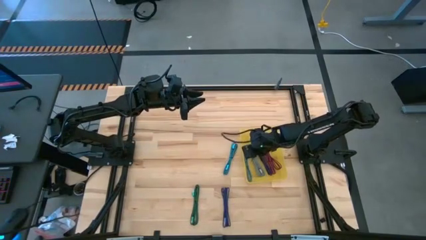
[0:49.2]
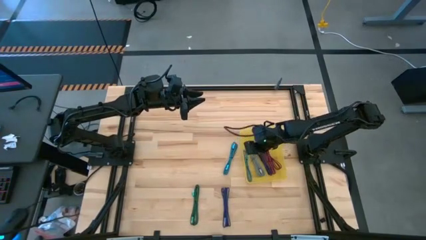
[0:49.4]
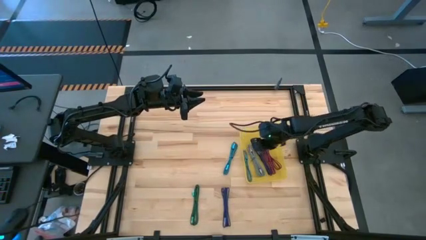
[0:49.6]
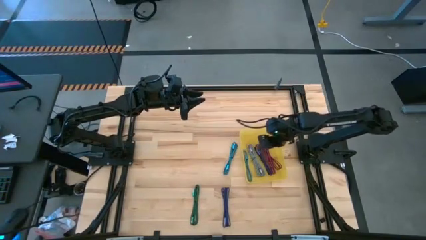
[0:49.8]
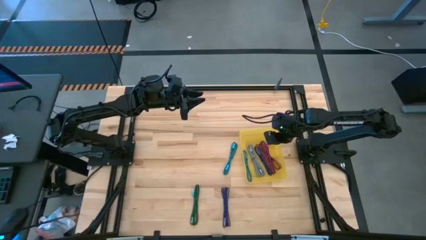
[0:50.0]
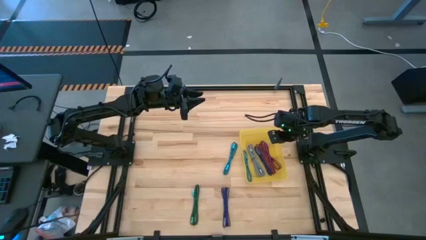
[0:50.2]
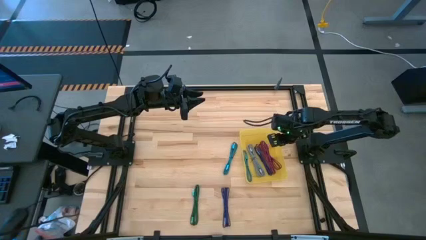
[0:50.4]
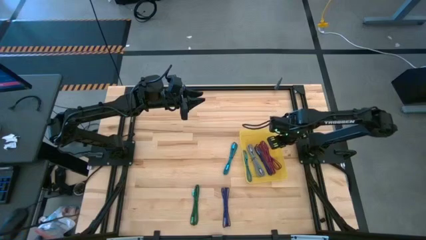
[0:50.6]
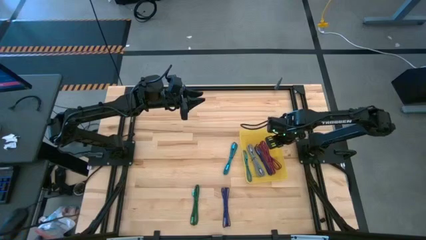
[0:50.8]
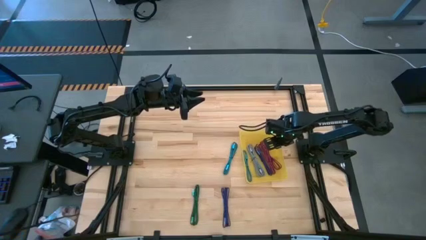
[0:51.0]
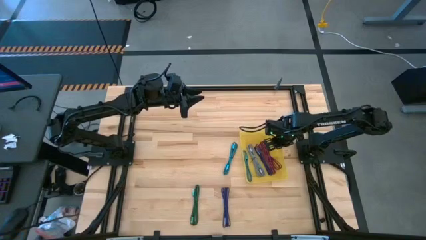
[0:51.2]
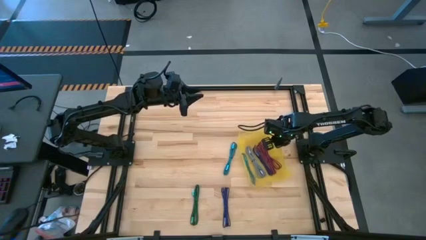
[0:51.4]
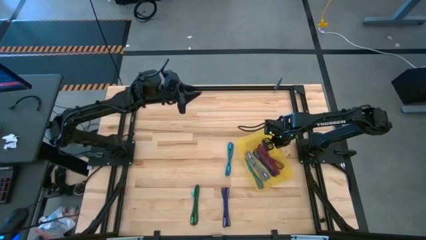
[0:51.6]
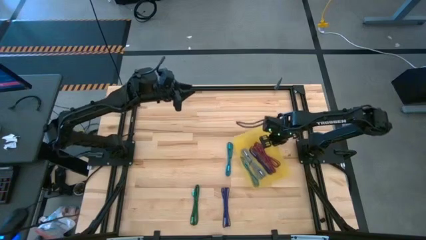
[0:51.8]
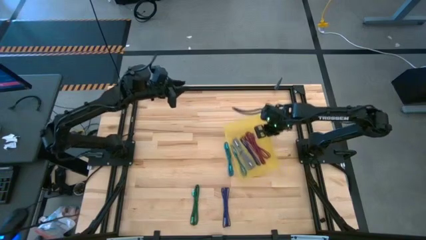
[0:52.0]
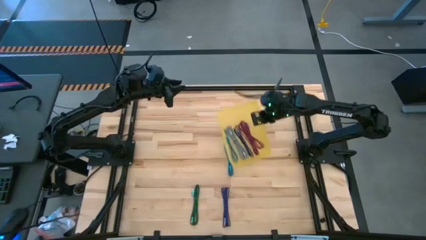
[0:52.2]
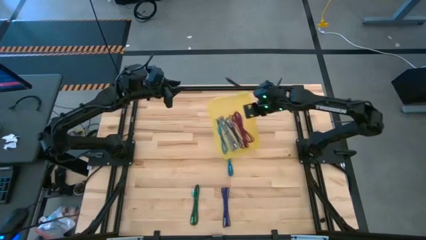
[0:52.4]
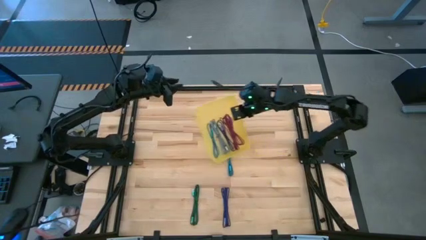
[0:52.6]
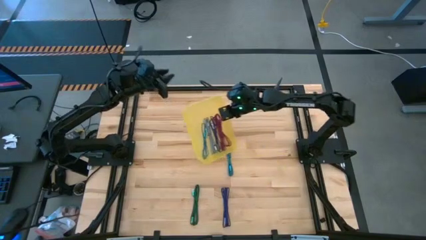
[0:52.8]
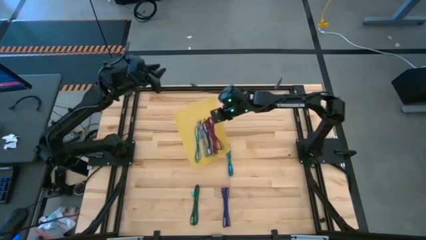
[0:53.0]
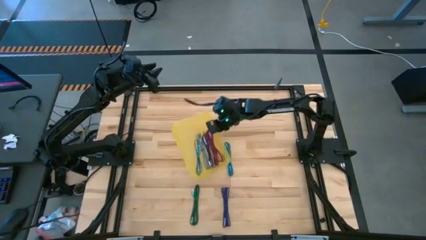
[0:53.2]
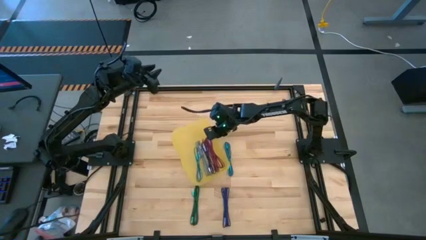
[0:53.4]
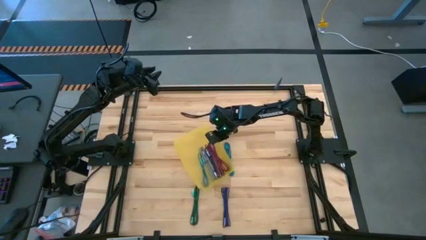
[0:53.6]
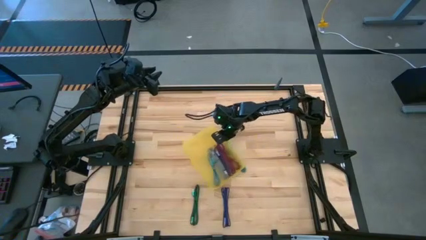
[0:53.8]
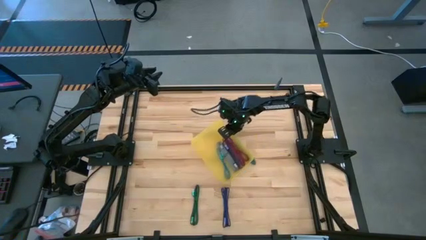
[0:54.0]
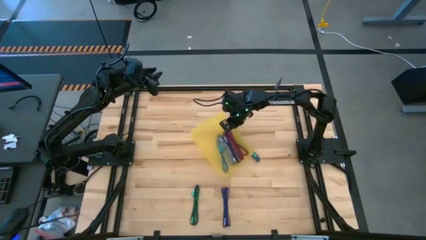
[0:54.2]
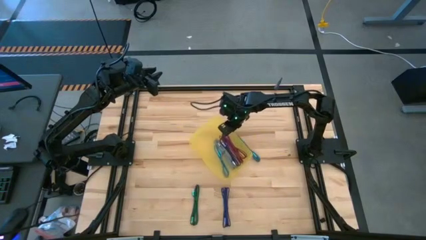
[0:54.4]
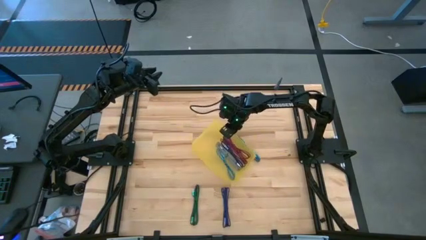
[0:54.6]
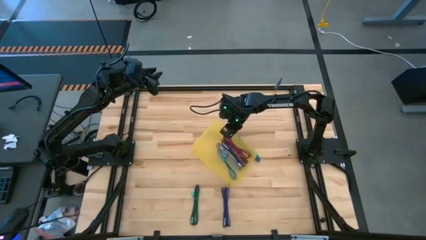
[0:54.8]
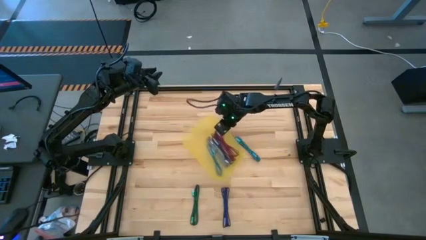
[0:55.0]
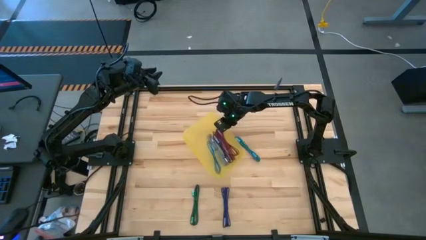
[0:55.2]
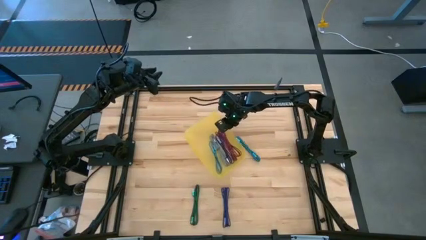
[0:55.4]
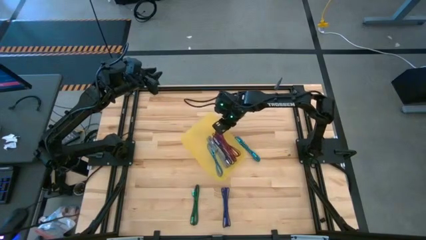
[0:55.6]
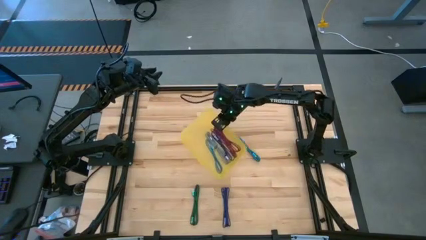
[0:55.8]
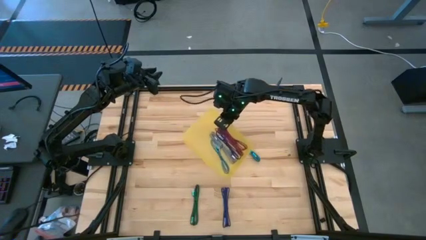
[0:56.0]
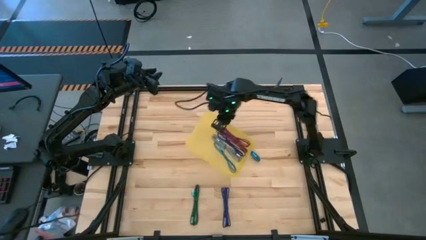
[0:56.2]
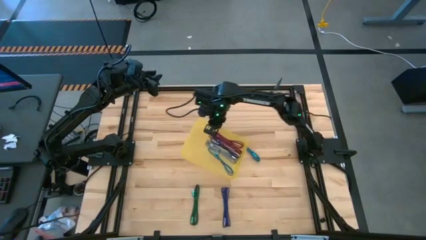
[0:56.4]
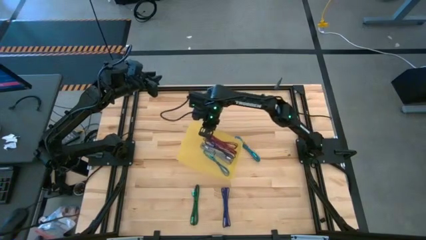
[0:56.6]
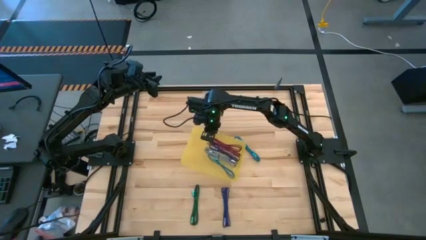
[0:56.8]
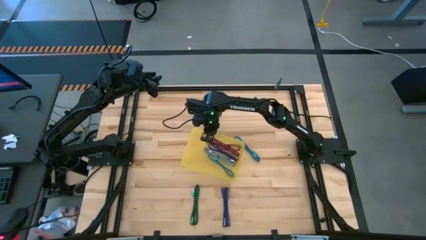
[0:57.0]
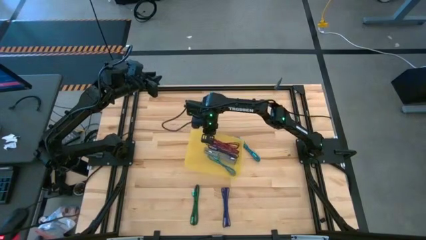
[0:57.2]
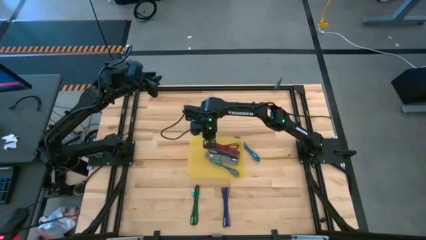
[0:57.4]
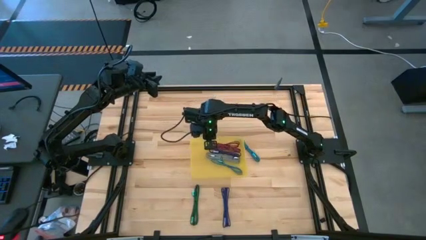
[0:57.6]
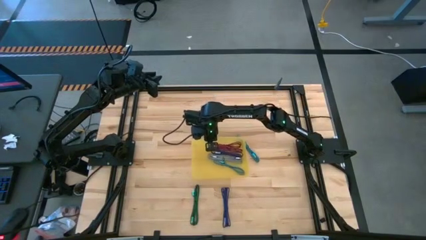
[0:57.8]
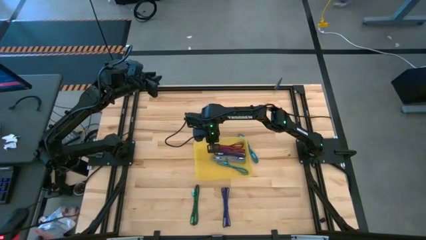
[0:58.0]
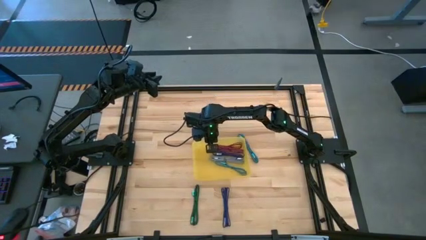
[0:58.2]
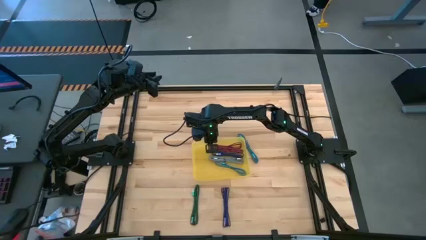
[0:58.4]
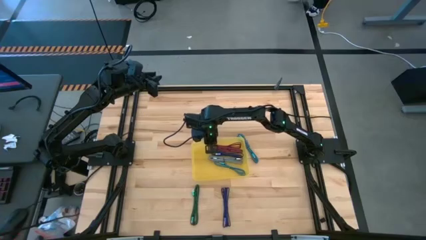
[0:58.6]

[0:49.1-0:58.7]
Task: Pick and place USB-C Cables
Move the yellow bin to the center of the table

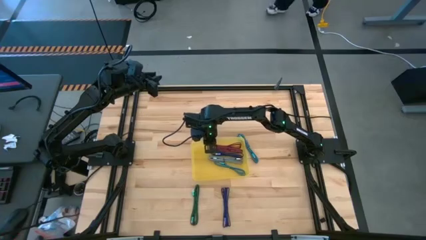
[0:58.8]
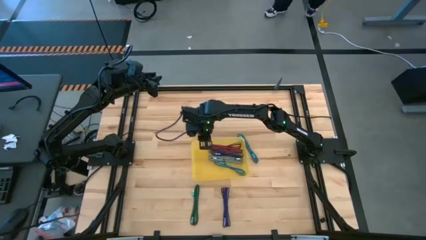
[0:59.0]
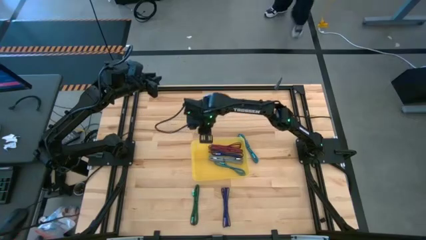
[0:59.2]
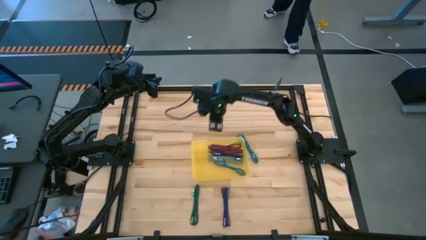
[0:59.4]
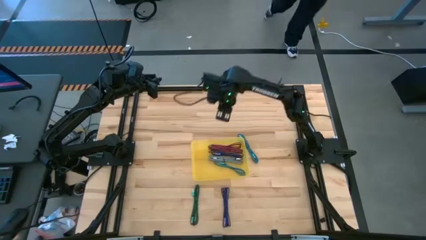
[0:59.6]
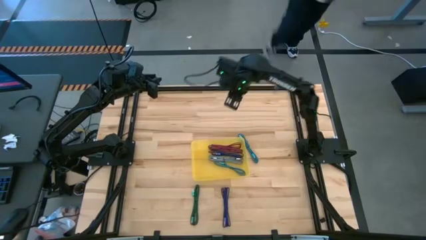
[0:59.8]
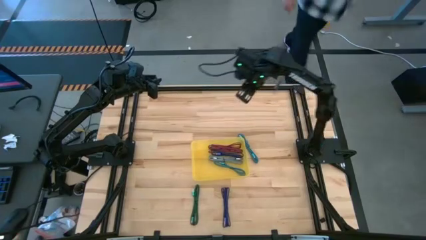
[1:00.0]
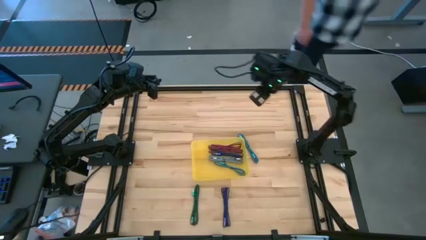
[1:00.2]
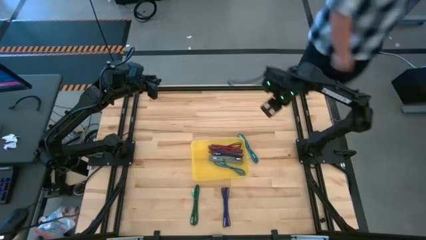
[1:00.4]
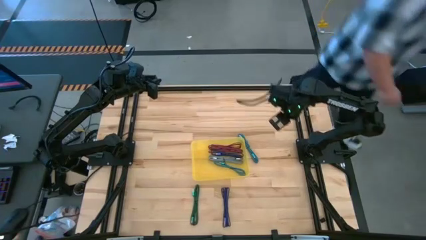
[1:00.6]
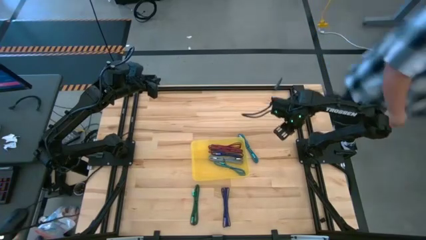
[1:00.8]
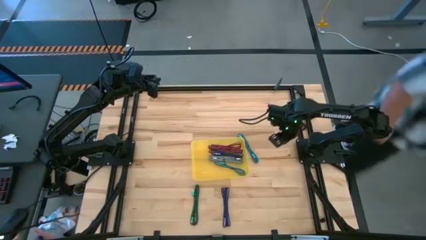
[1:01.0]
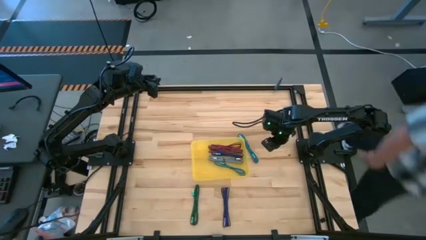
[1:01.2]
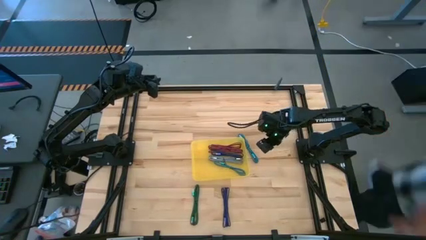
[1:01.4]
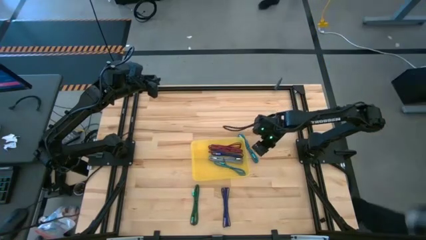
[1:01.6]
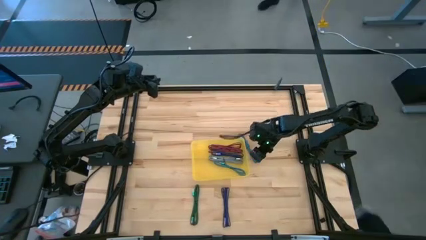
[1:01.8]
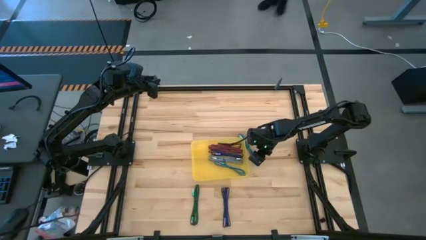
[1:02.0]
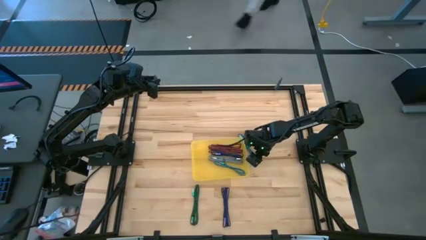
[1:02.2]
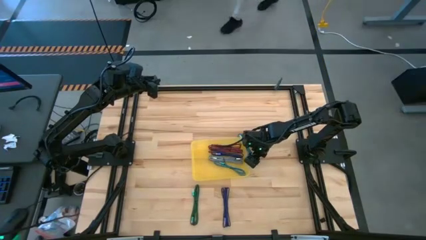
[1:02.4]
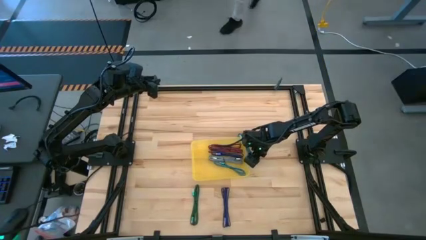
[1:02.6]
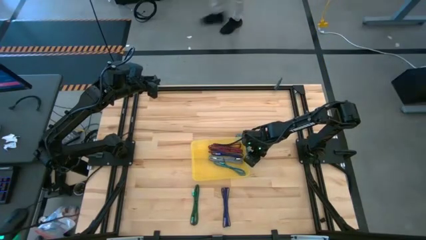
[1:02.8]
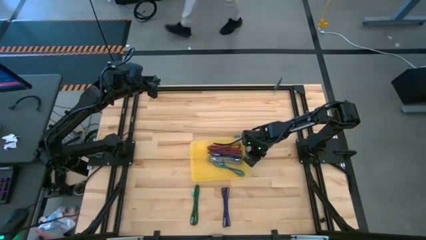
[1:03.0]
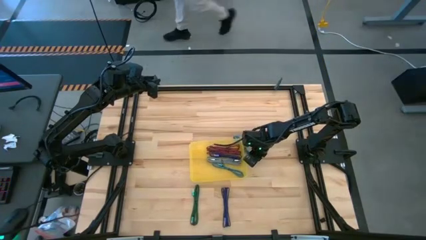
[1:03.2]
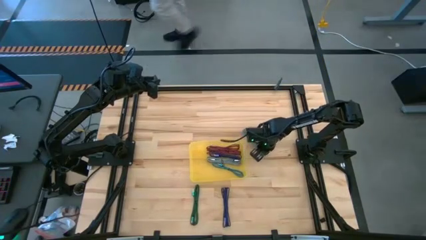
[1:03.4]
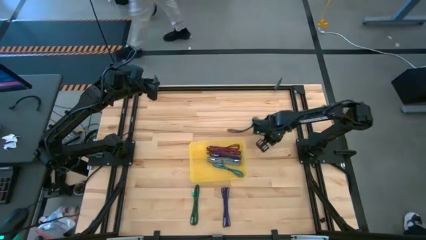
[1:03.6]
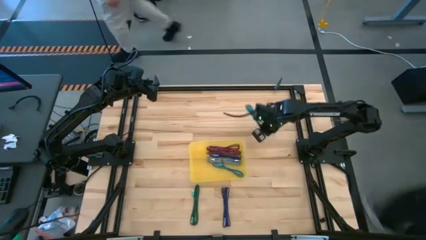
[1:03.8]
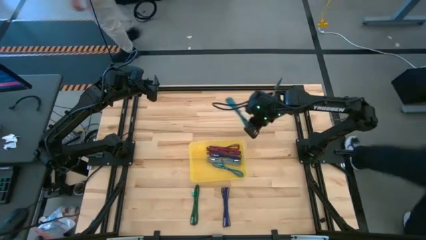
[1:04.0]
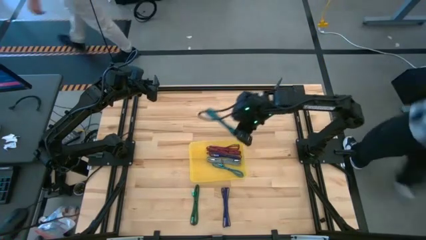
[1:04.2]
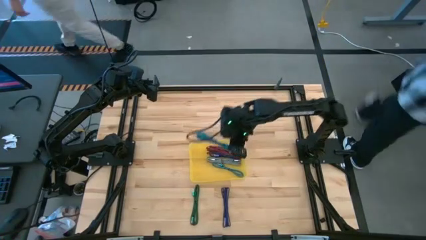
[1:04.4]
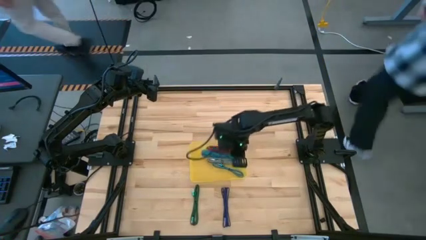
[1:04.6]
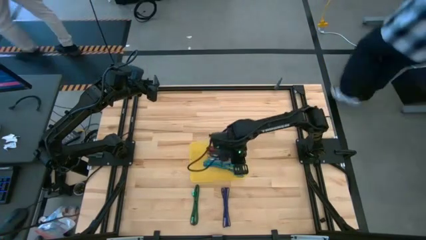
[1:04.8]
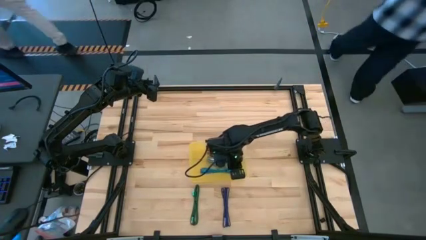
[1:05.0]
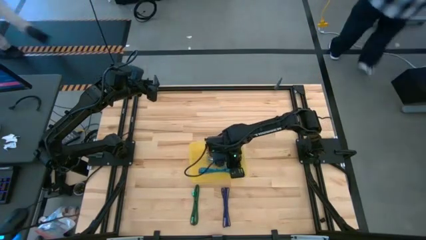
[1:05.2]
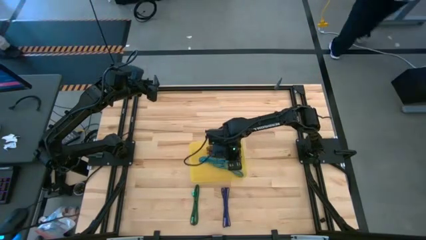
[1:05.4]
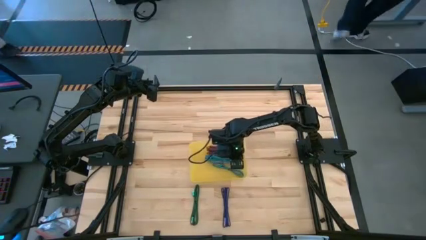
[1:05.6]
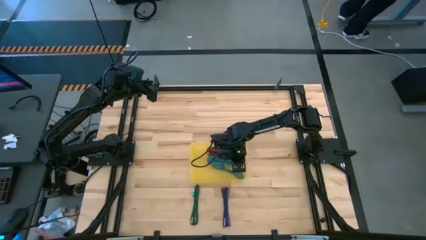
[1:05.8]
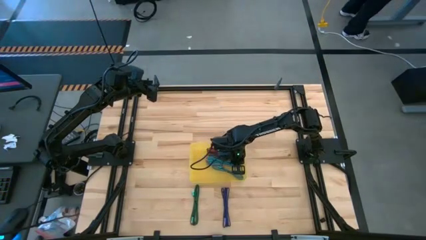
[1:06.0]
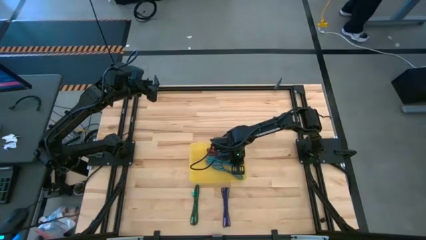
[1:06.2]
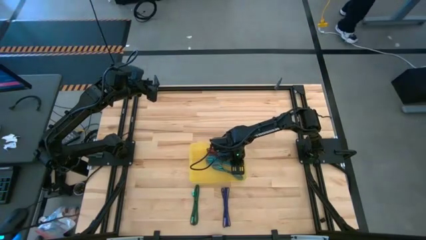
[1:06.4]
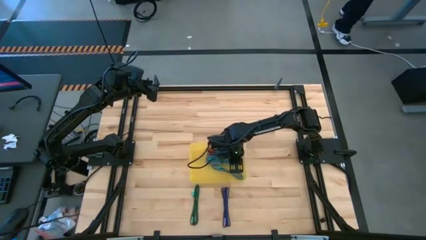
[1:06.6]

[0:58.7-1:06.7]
Put the blue charger cable into the yellow bin
